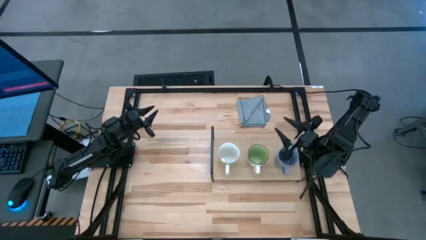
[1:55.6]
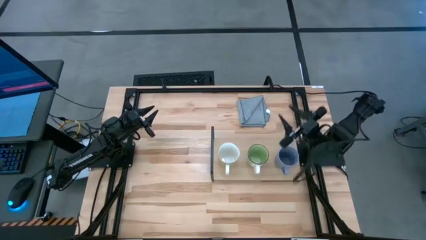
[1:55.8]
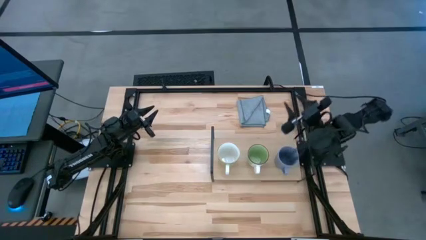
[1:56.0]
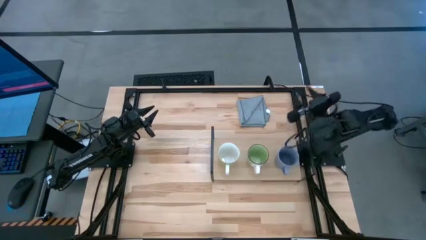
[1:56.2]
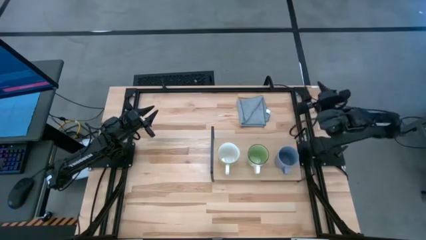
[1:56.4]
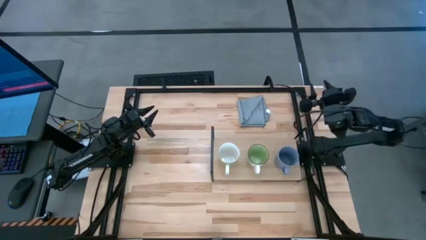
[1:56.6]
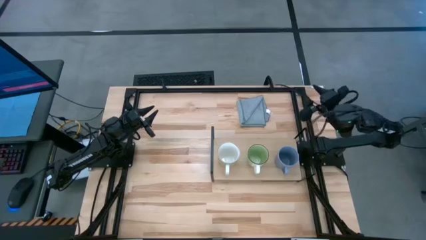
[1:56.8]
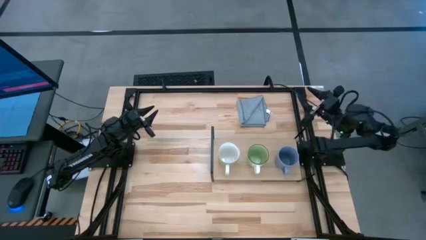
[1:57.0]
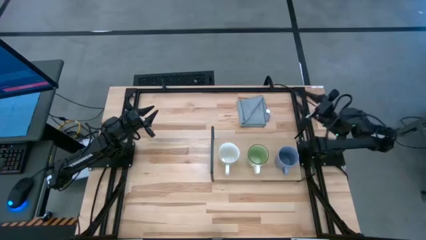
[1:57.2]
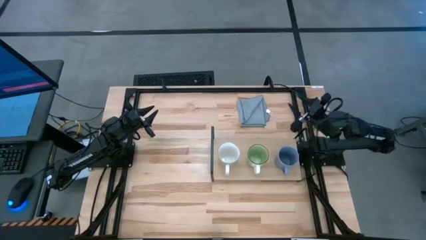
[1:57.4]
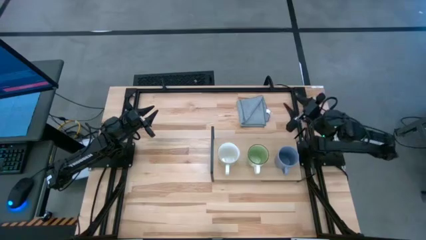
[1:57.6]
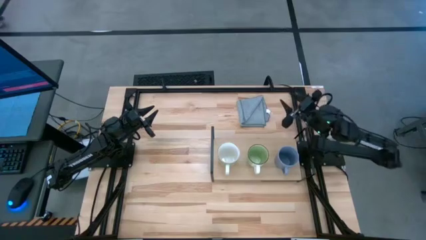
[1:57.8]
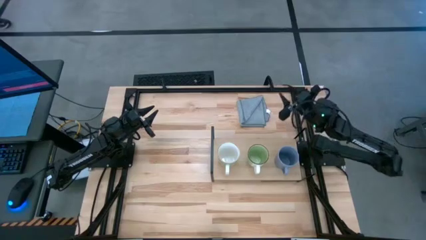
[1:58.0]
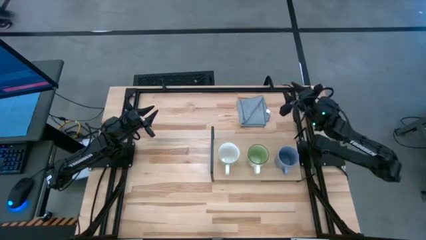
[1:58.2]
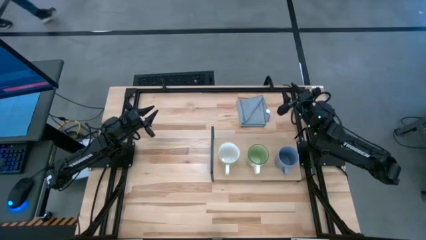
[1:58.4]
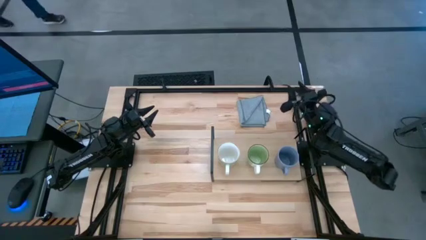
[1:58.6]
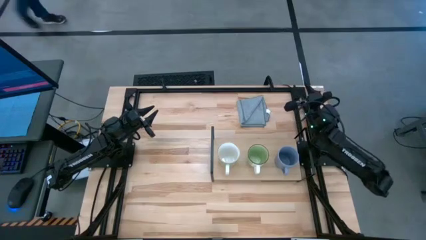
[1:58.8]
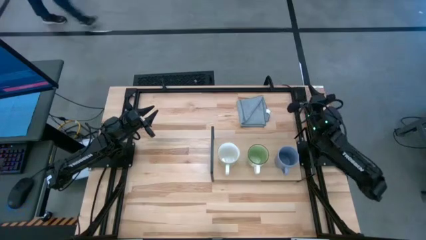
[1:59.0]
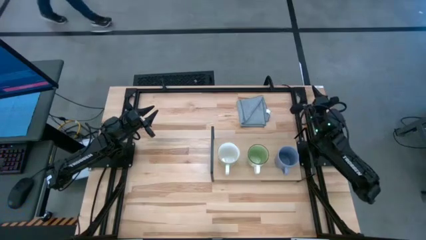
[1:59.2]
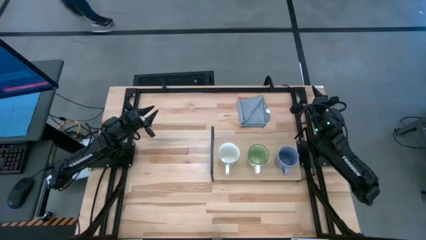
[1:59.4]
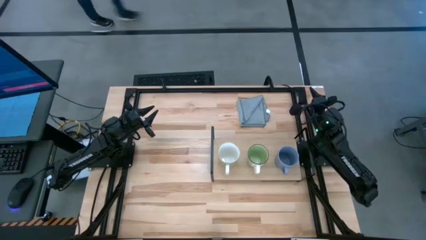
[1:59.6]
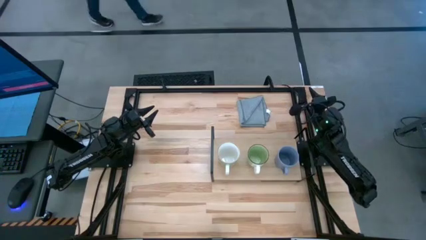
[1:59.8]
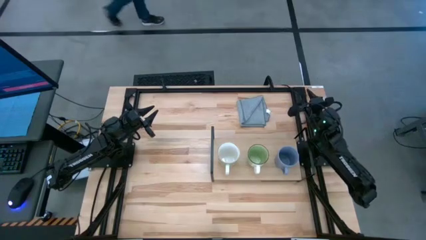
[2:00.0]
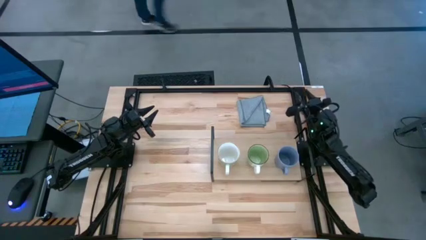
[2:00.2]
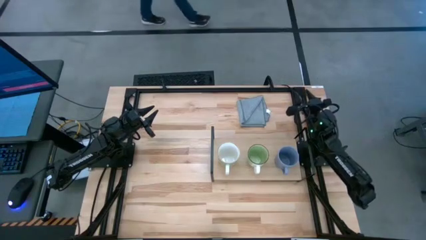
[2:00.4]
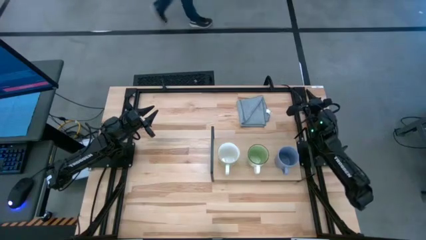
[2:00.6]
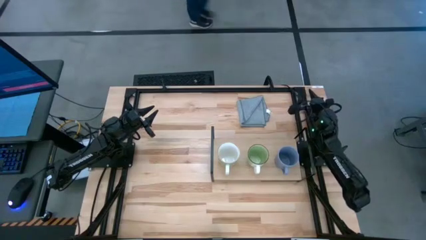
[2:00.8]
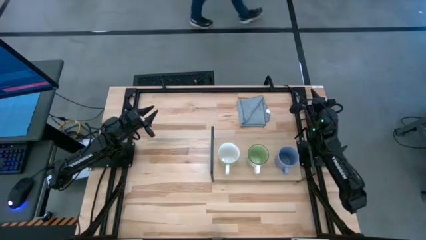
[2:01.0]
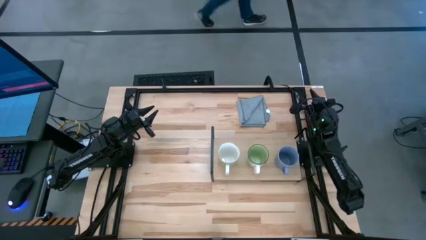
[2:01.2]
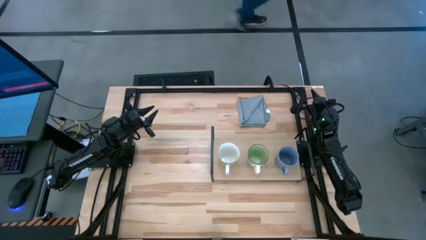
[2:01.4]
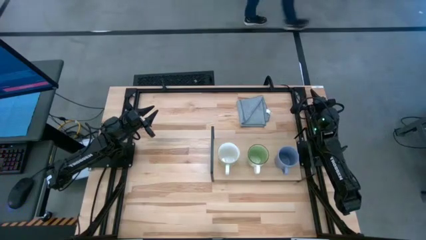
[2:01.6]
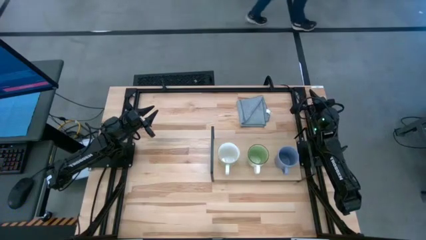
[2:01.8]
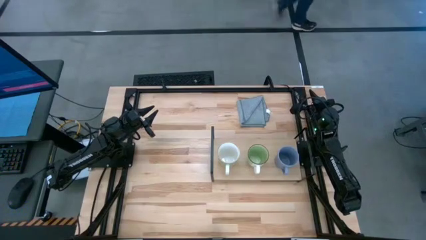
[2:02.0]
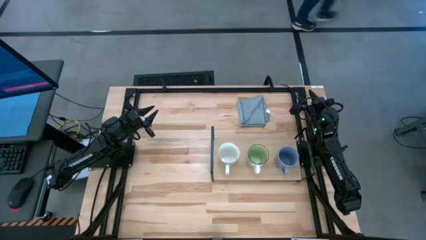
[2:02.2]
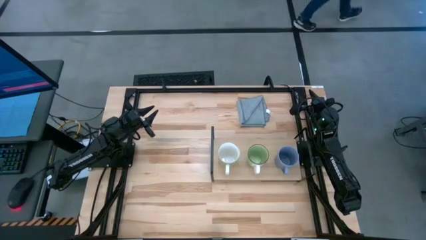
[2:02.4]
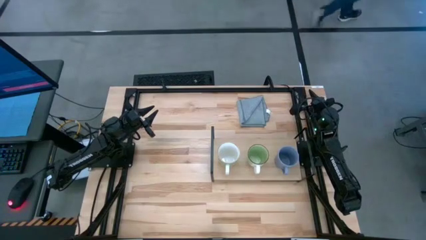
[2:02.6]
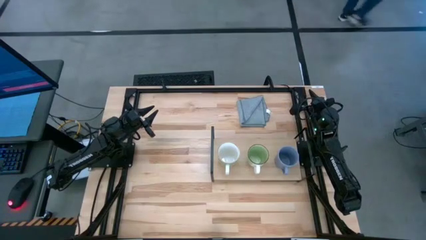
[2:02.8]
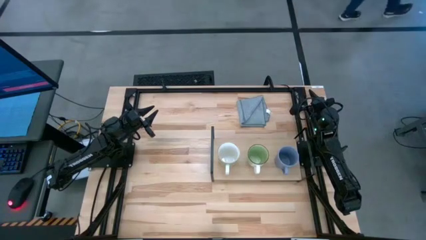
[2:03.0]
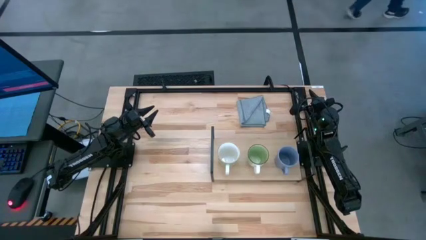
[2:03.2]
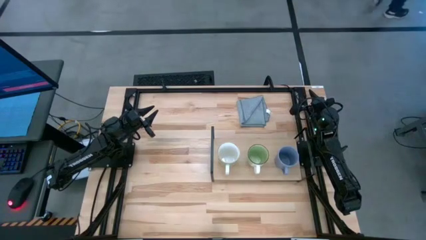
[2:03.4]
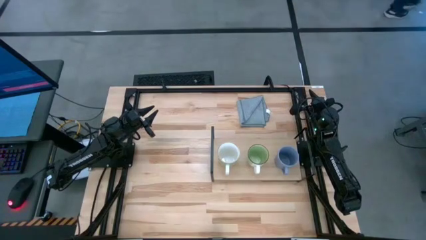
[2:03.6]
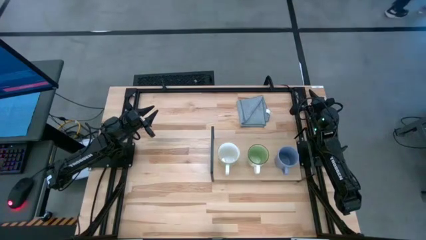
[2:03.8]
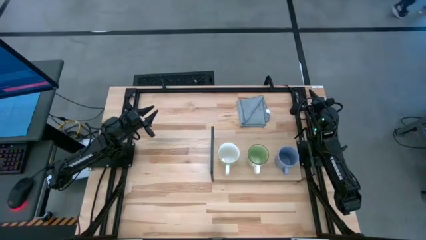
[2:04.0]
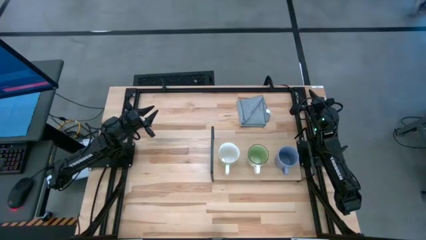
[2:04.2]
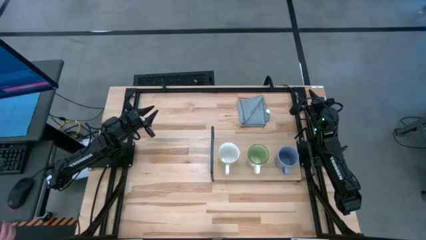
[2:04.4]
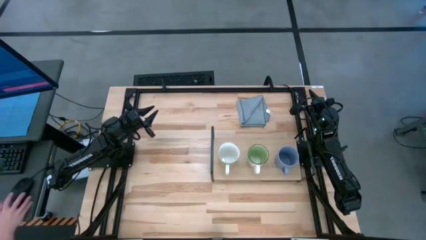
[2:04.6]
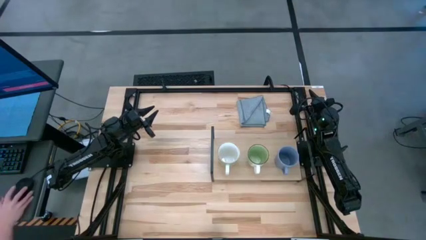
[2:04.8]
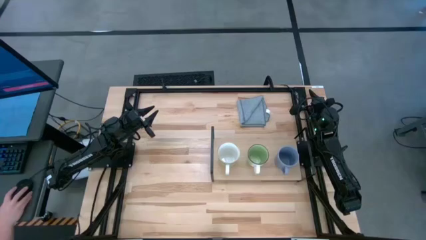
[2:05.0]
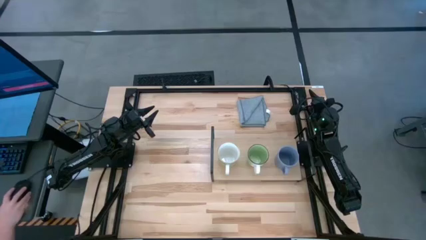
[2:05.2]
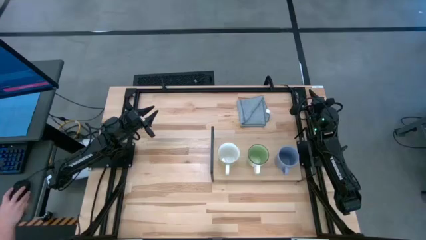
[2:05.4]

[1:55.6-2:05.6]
Task: Stack small to large cups/mugs on shelf
Return to Home Position

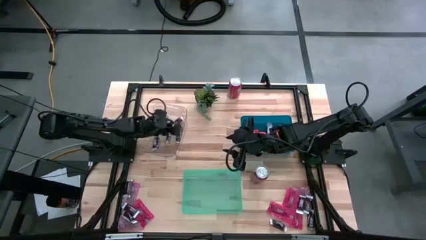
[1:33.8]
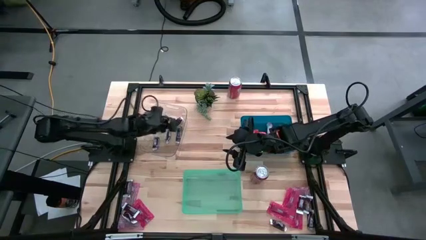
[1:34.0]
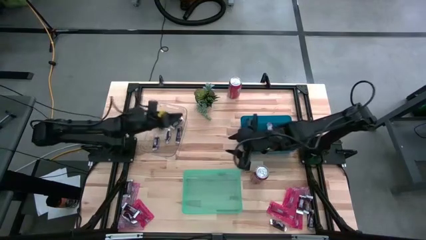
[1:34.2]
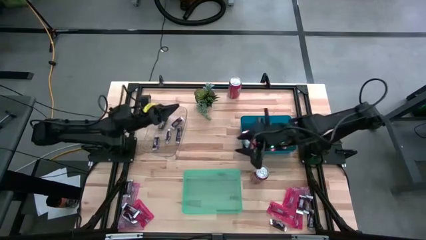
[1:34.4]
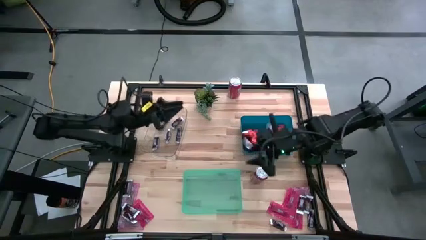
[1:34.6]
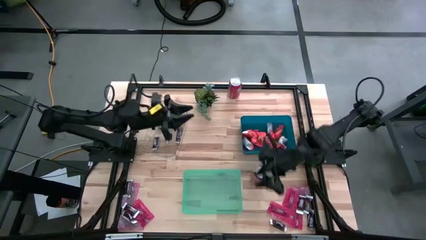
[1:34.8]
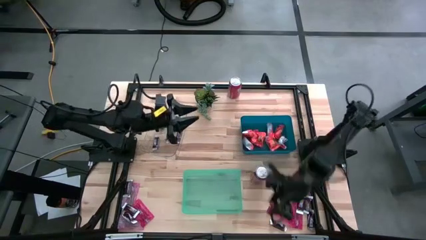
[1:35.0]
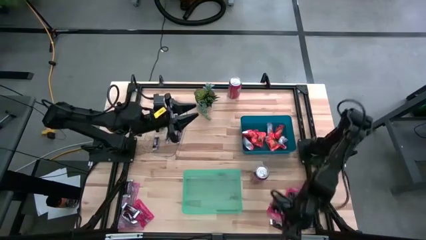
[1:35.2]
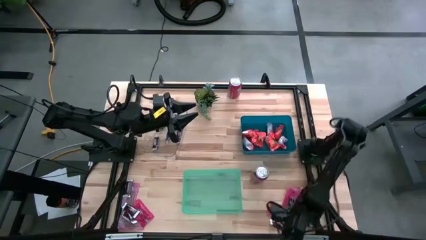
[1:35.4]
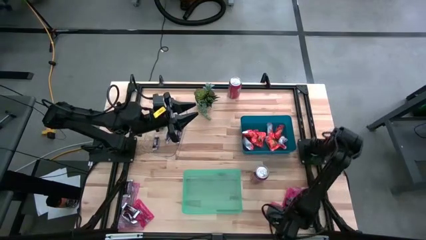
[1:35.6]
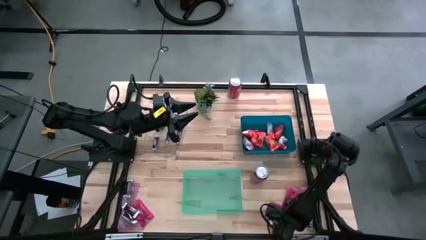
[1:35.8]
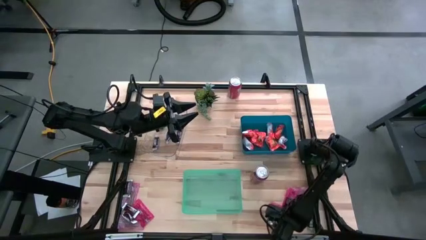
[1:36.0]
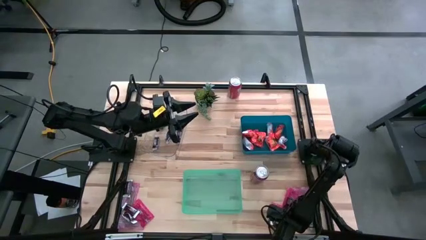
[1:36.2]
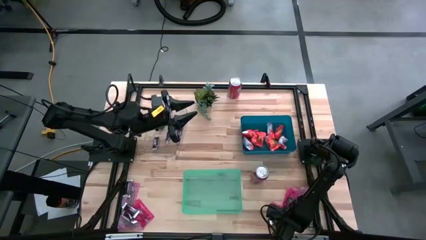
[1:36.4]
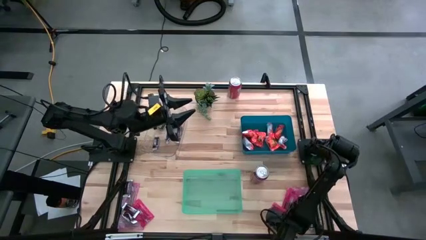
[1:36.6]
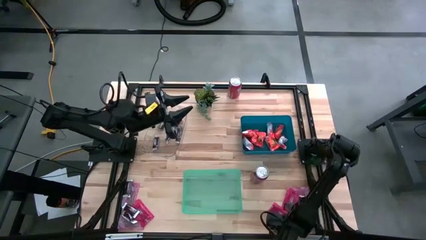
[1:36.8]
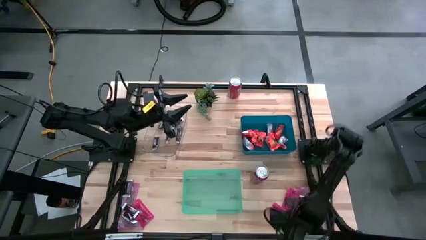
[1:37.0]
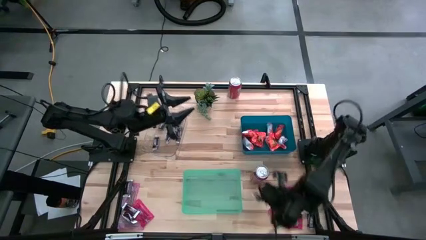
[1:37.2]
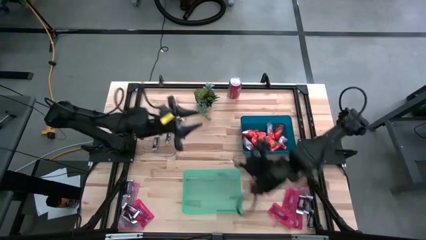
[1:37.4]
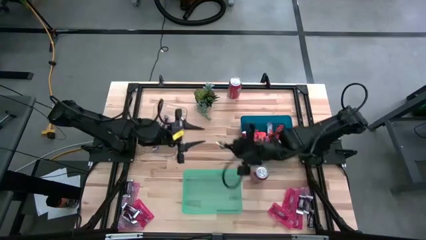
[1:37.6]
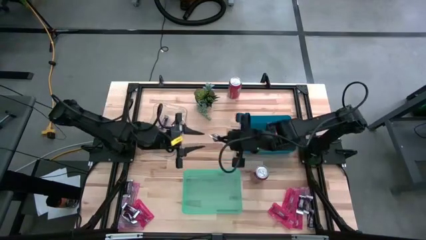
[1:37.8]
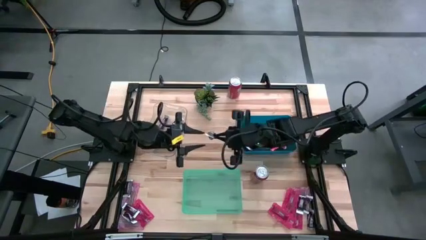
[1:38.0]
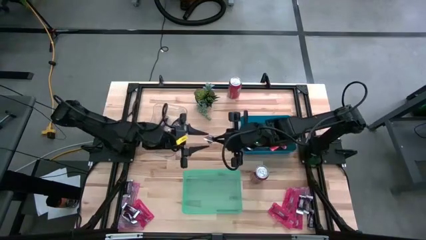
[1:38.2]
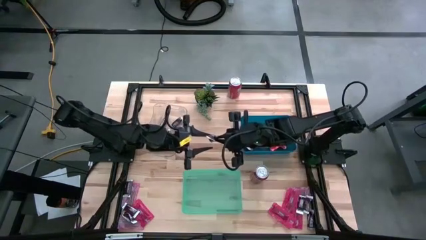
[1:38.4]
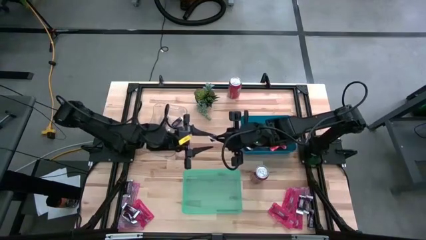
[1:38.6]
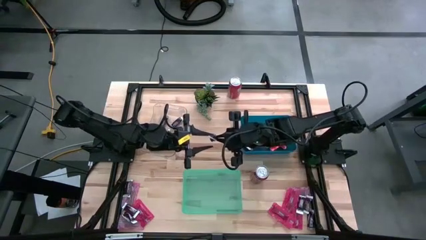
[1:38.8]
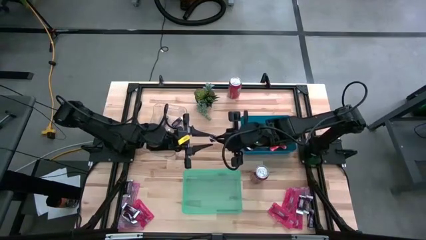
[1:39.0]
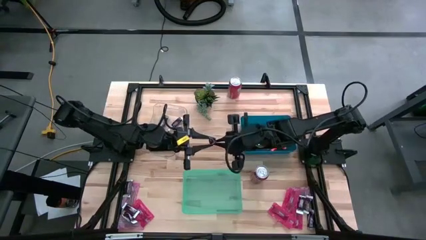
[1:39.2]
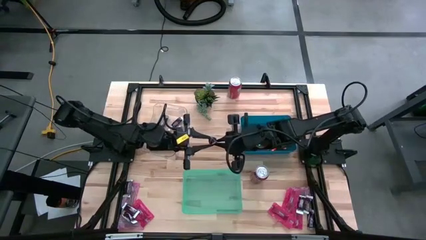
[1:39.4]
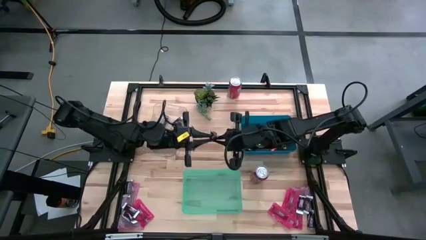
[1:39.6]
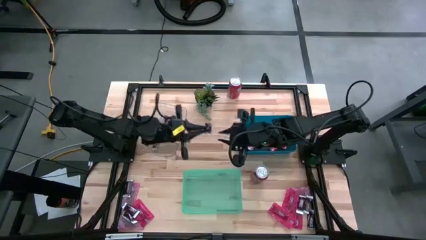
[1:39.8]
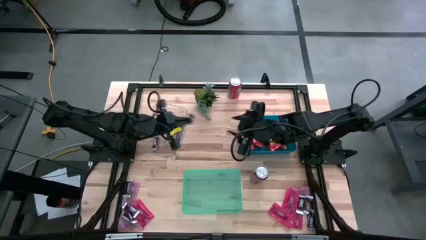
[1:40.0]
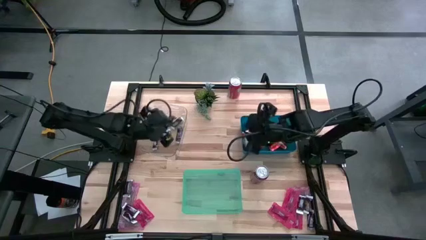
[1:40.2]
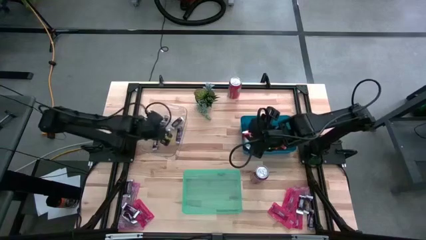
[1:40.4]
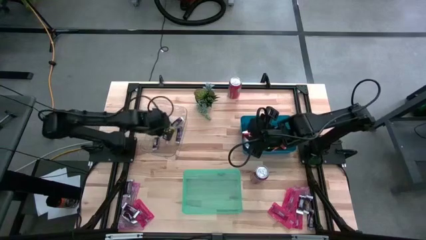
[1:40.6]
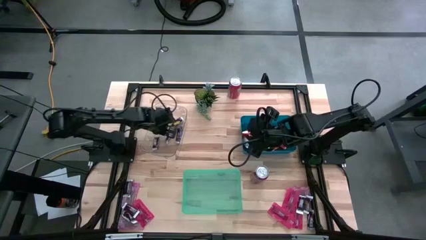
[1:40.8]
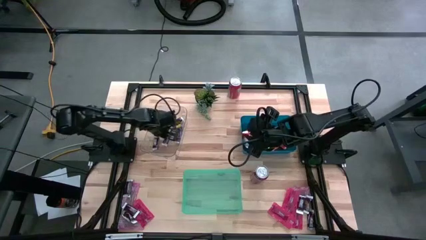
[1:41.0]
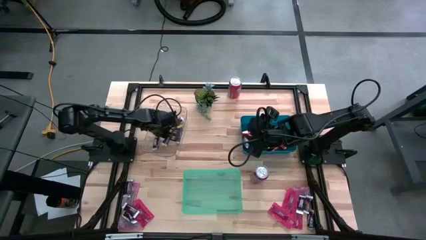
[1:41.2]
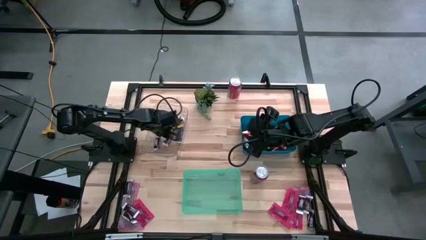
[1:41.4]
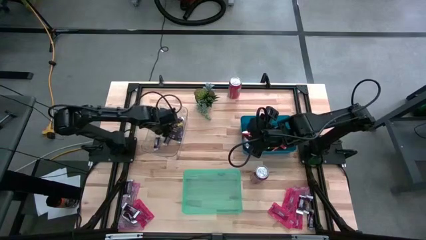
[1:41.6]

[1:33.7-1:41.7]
Task: Sort candy
Put the brown chocolate bar into the transparent bin
